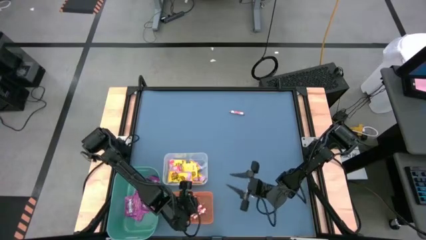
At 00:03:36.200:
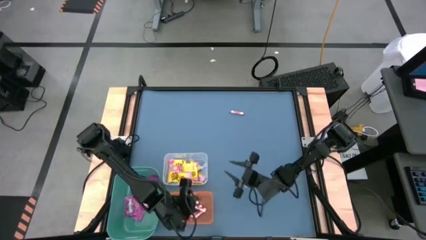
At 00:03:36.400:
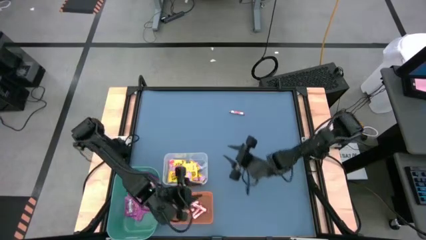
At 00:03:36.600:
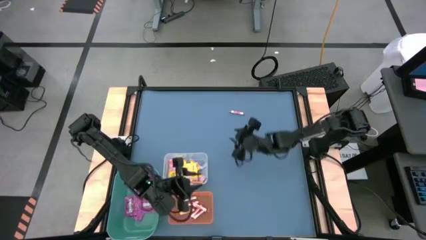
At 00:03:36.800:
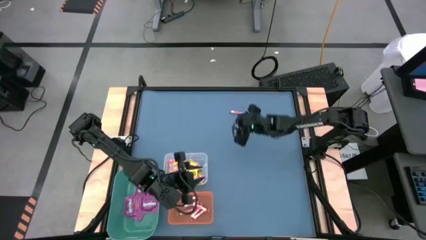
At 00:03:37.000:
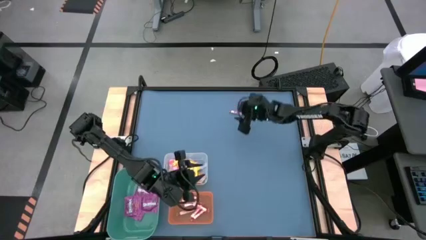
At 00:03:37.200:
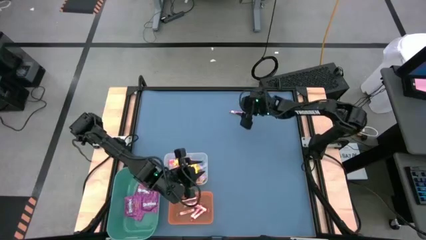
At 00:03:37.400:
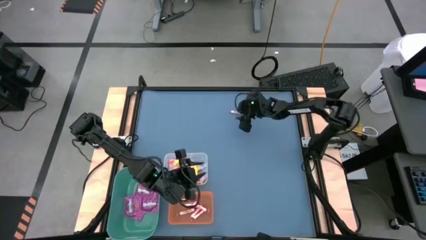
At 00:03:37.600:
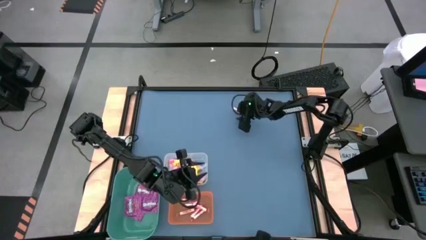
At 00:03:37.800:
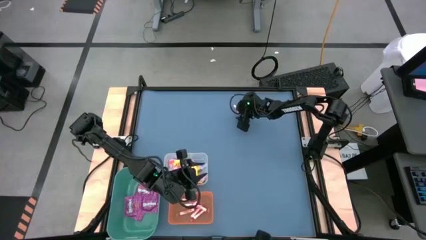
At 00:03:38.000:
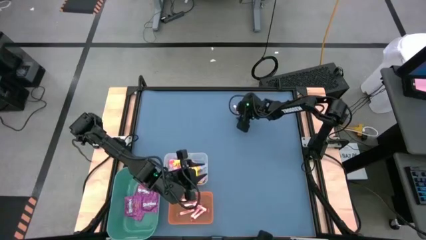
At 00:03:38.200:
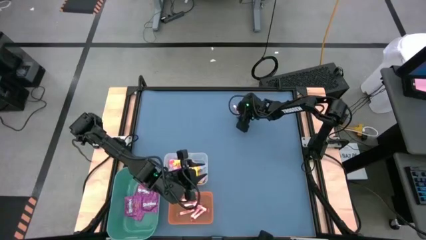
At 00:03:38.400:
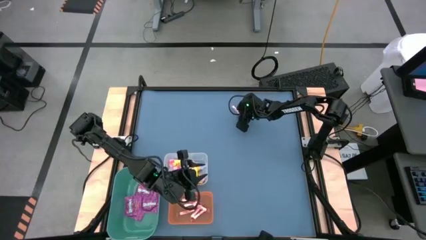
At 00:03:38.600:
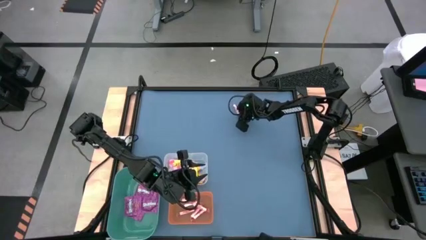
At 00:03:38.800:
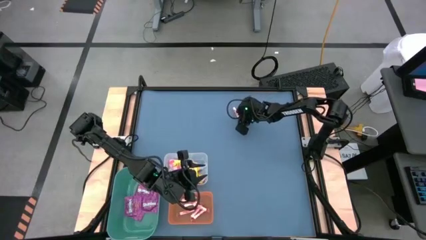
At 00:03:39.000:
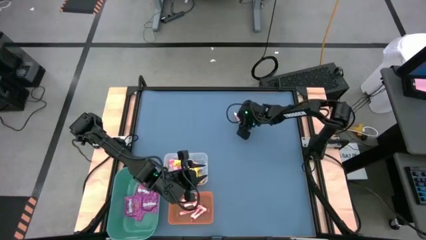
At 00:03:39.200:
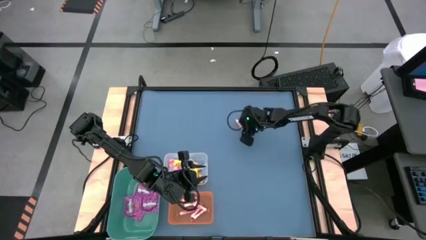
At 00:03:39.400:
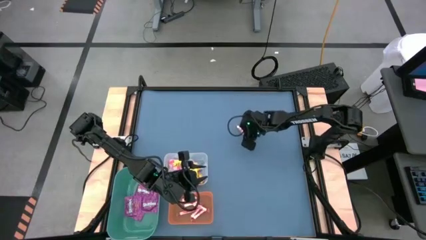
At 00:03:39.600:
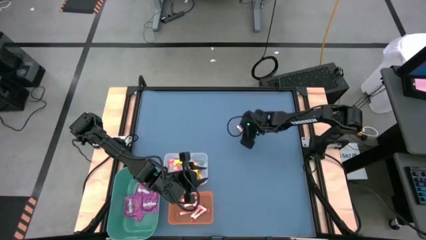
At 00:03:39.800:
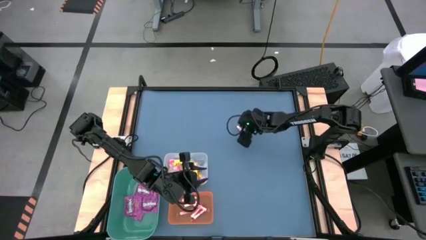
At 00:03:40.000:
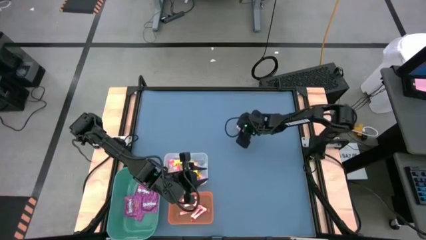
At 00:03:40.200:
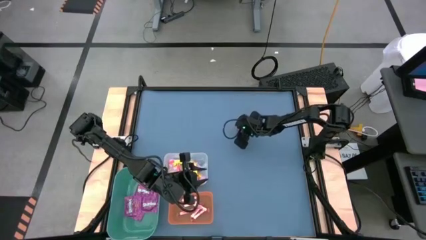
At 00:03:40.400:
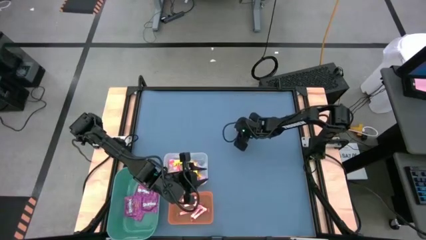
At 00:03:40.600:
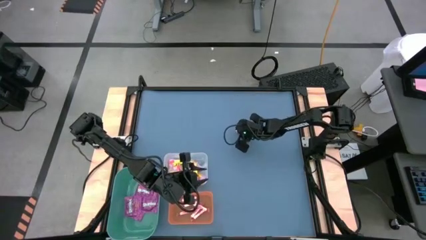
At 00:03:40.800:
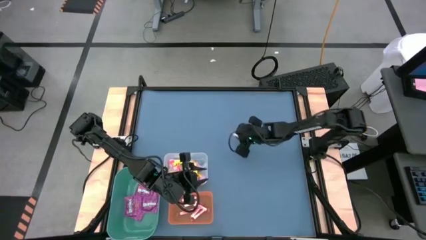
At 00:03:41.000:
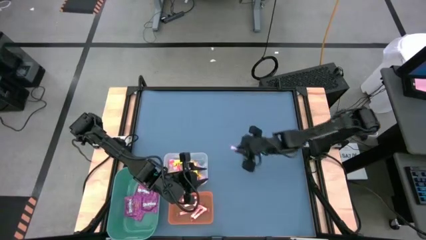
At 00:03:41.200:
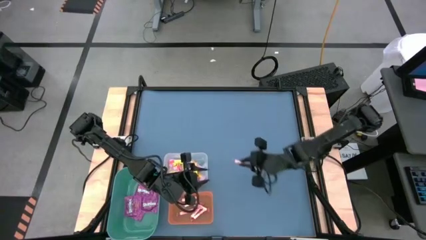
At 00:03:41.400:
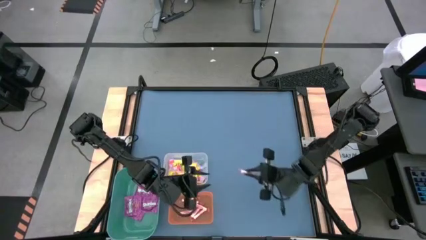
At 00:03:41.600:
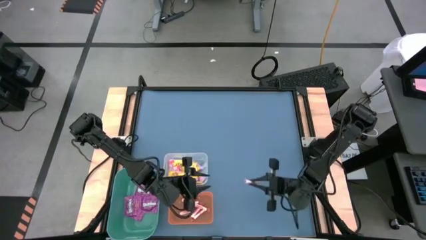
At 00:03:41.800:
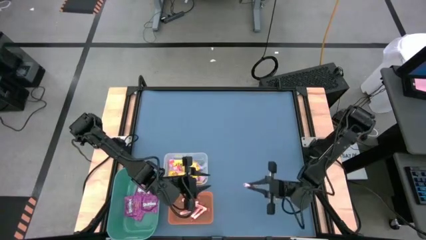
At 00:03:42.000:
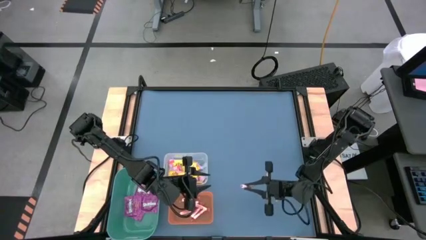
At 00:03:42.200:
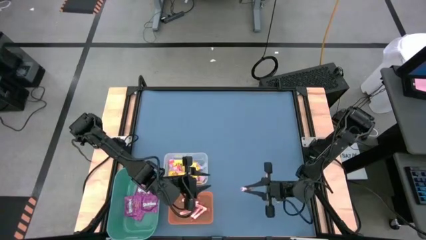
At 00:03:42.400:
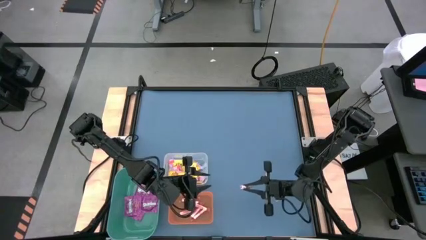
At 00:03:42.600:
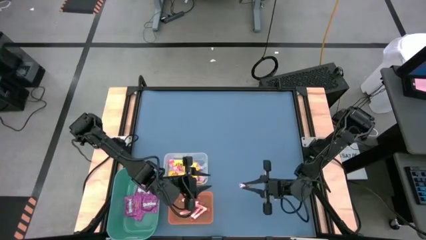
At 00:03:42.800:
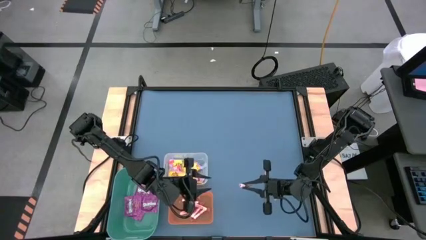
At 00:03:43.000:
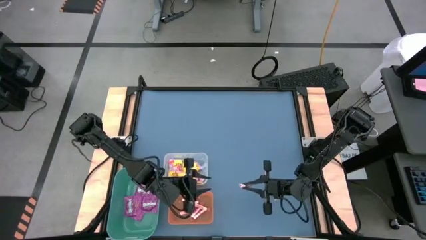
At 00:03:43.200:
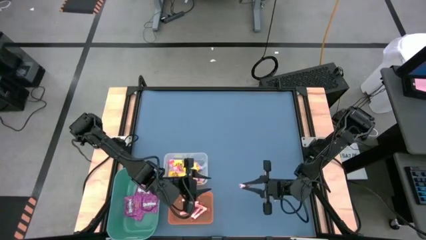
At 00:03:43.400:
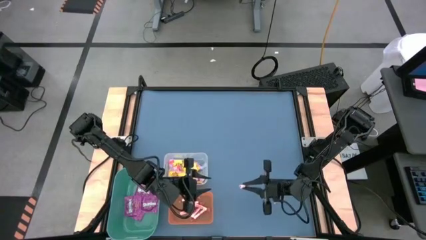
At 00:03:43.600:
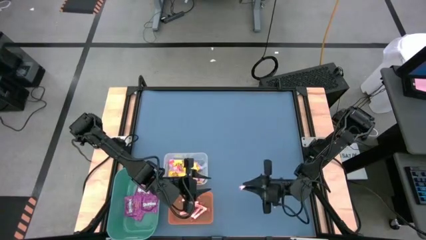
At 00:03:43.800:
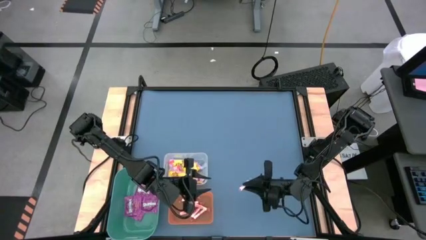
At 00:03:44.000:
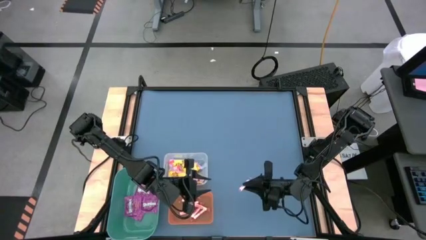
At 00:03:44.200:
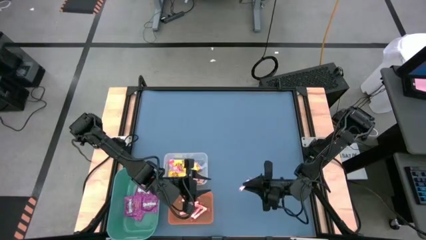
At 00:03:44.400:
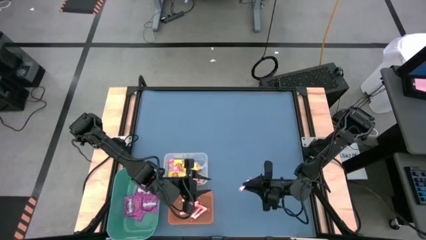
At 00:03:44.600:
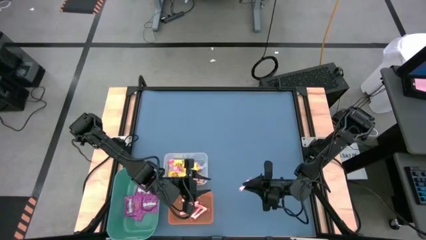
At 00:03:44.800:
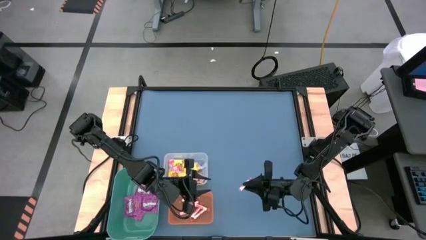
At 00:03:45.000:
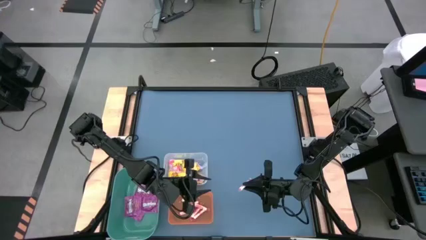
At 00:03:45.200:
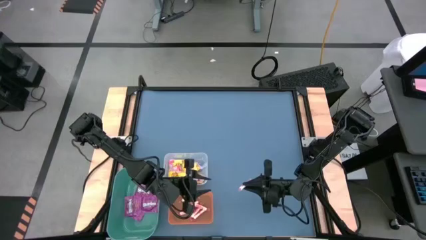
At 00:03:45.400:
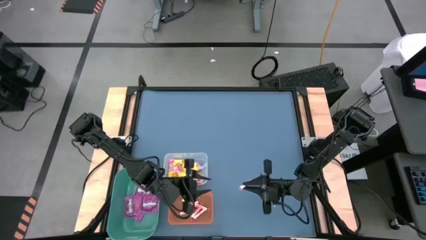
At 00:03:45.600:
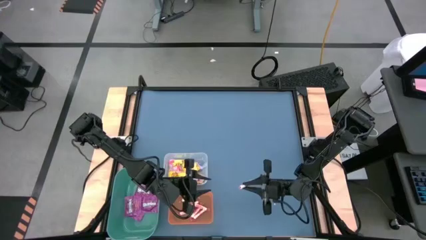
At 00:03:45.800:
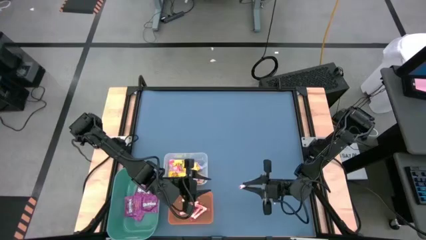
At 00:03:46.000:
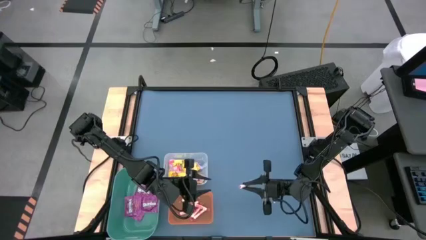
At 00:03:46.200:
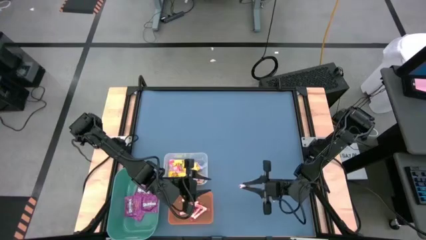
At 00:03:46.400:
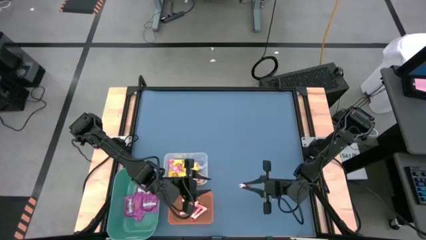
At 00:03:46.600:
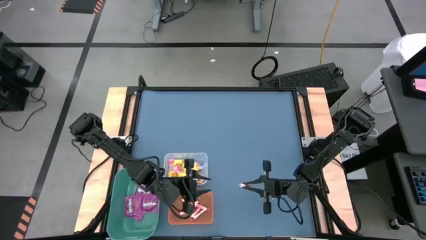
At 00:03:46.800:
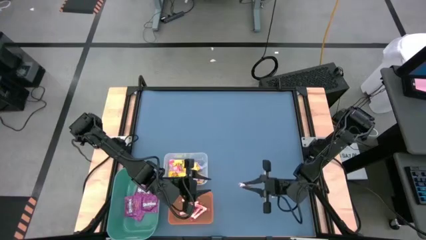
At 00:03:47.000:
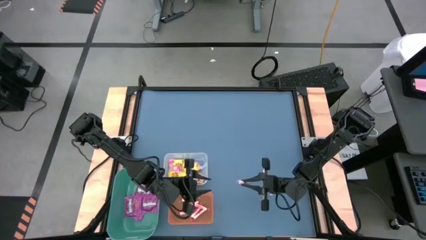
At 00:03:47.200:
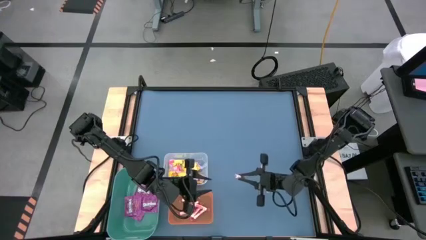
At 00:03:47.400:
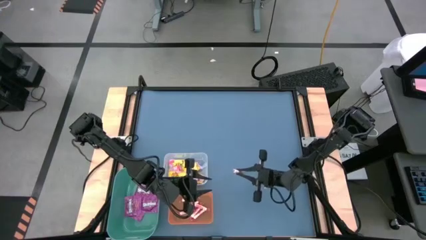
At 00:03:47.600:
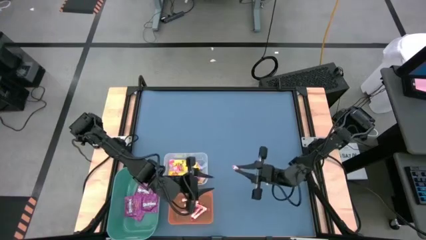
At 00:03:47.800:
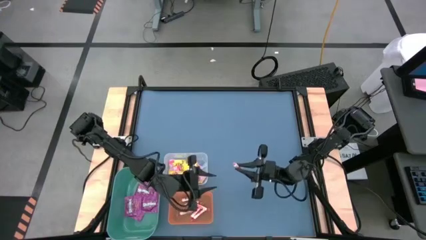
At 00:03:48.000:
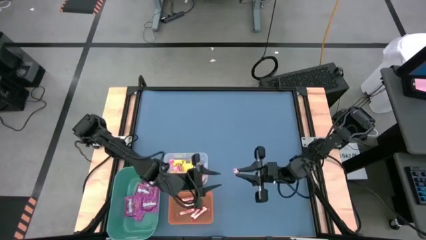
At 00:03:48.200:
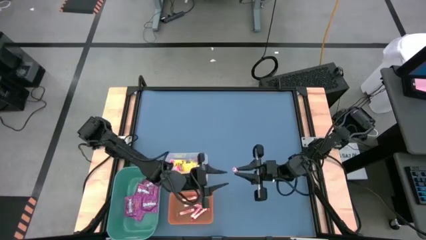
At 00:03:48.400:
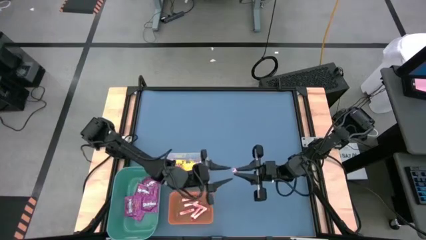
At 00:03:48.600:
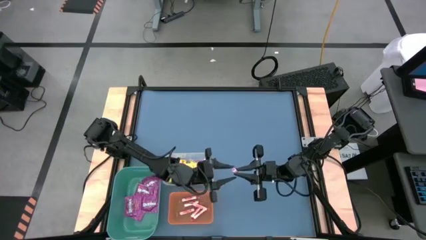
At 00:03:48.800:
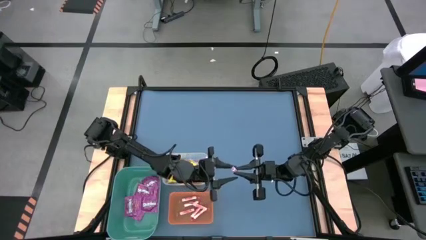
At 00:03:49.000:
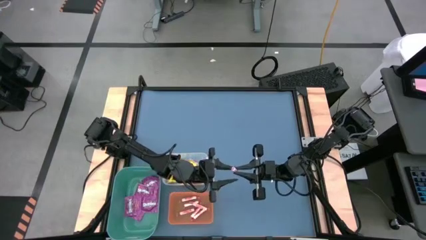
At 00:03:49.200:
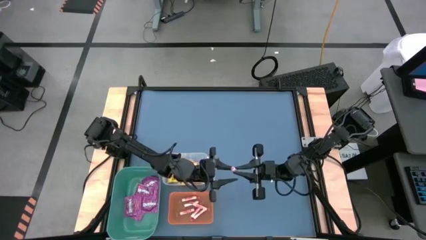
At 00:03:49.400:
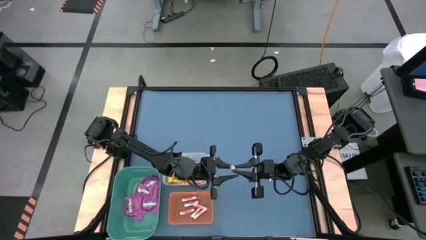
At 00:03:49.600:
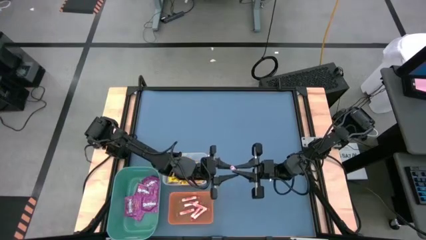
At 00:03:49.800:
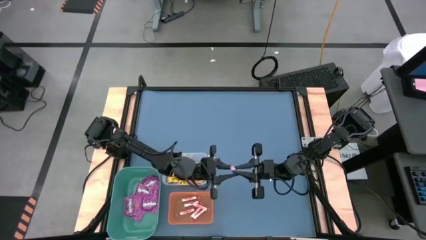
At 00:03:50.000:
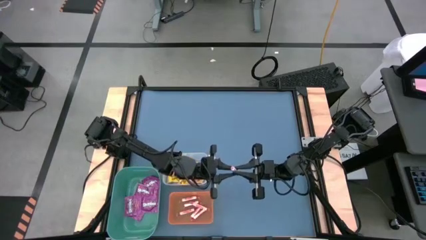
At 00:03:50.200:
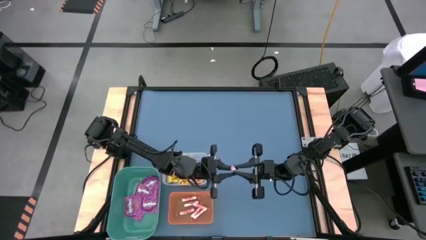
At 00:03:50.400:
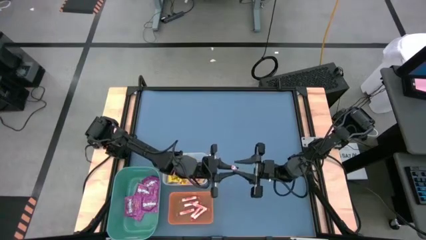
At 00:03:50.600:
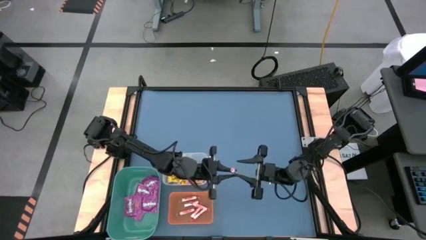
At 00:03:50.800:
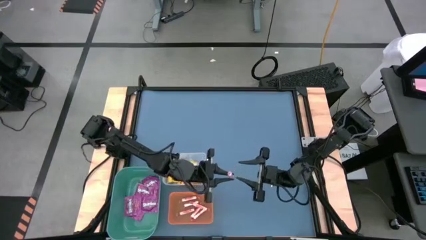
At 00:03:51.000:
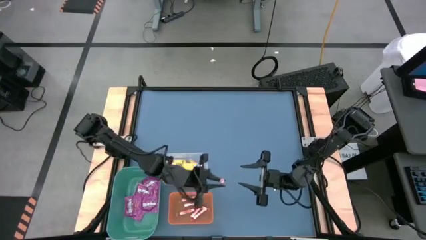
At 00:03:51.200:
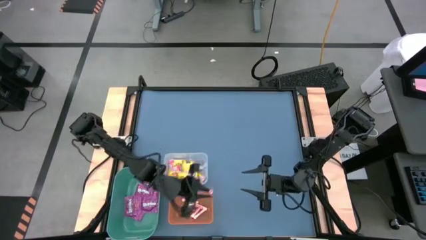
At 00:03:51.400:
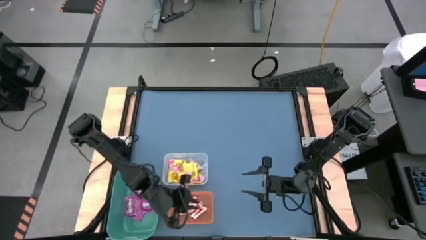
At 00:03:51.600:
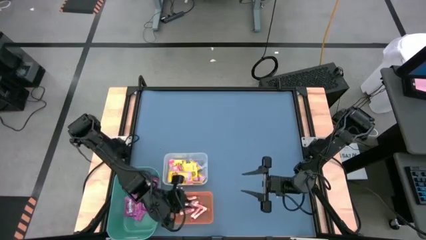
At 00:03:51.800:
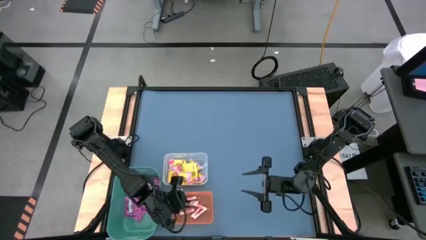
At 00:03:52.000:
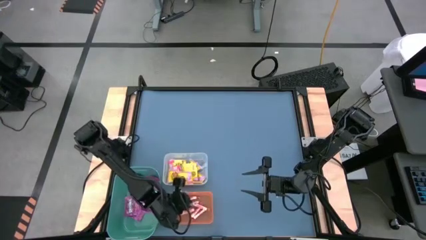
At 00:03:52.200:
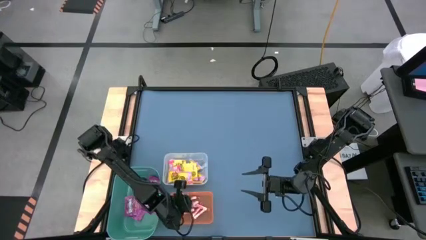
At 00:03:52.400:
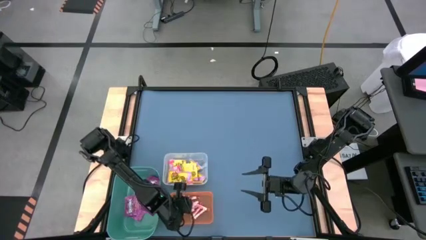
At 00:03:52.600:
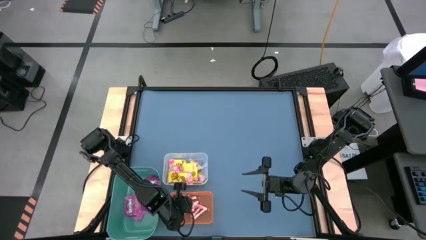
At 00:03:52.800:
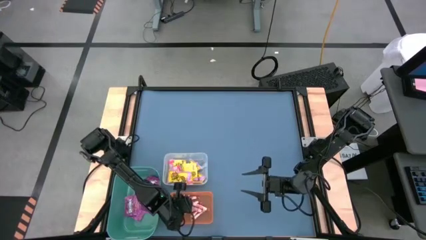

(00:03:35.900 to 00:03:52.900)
Task: Sort candy
Put the red candy into the orange bin
